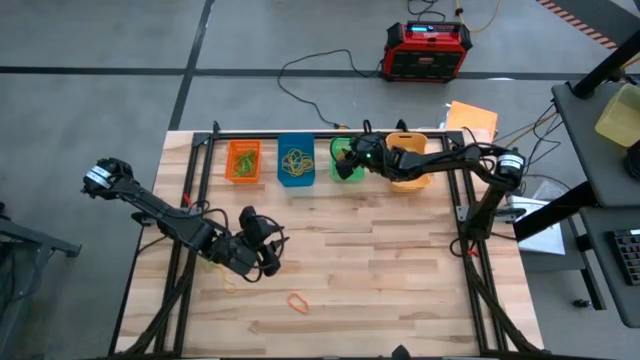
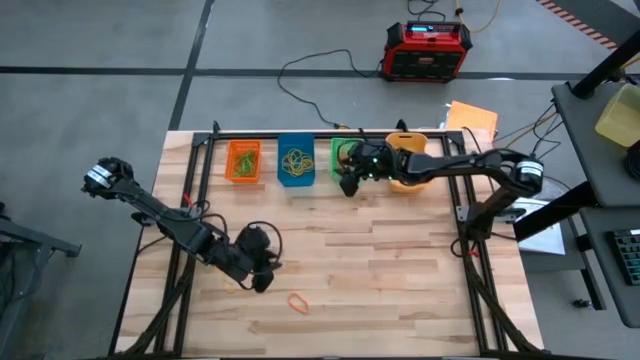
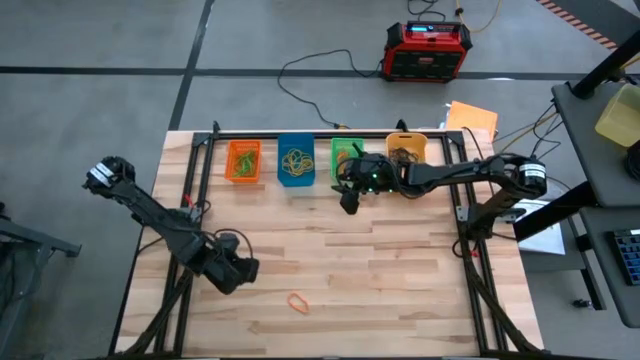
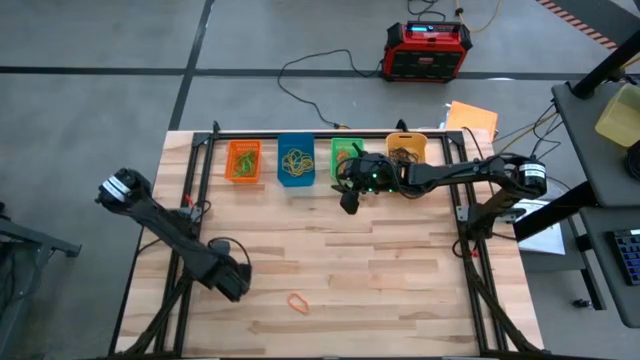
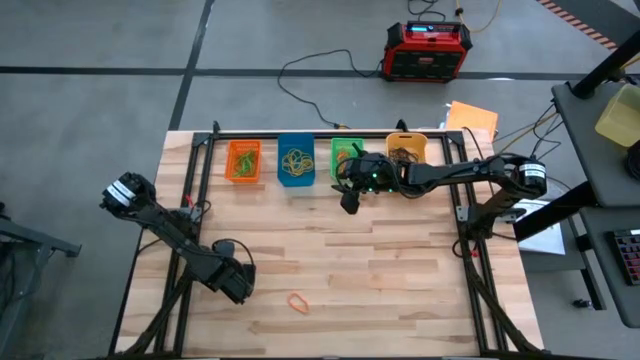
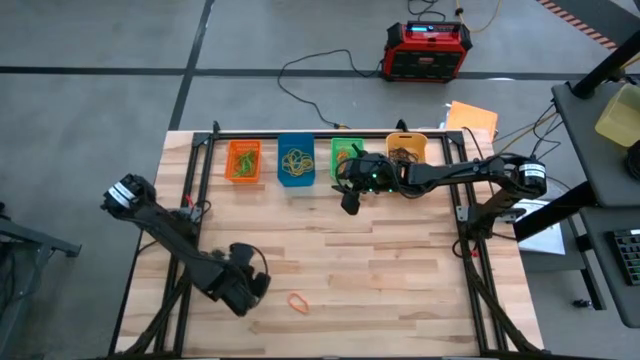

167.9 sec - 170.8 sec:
Task: Sort rubber bands into baskets
Put the yellow rubber band into the blue bin

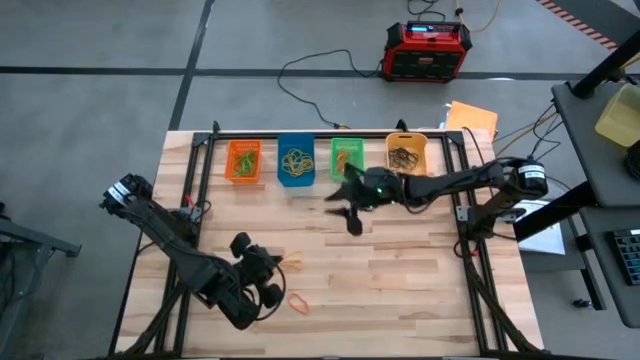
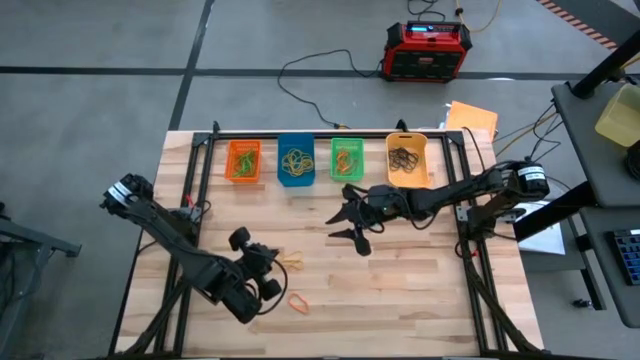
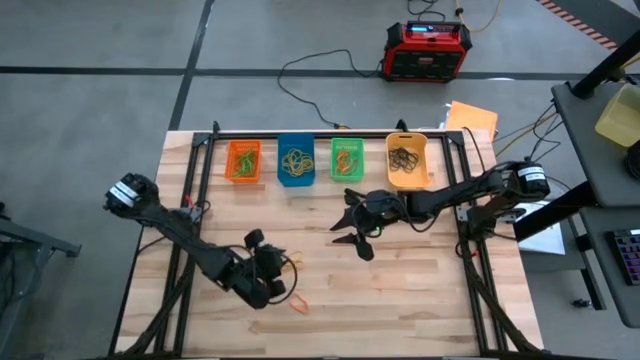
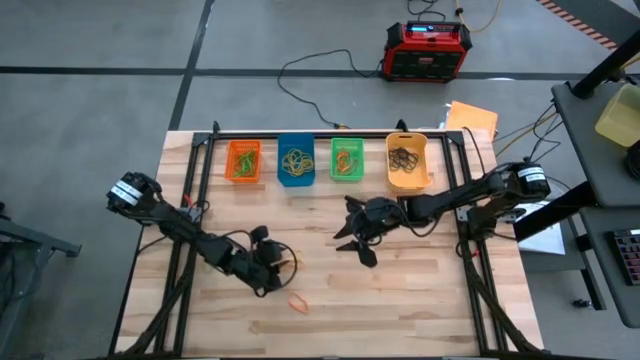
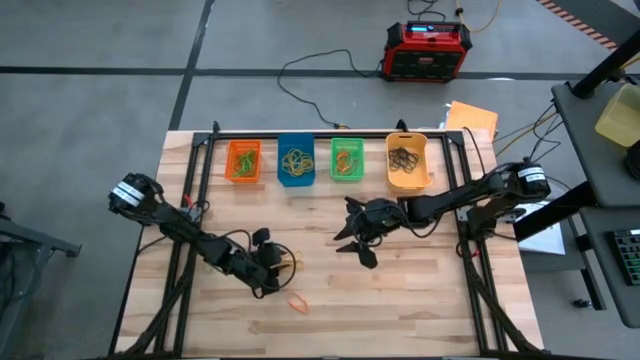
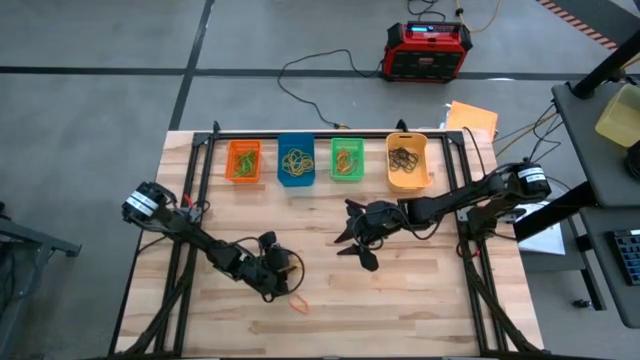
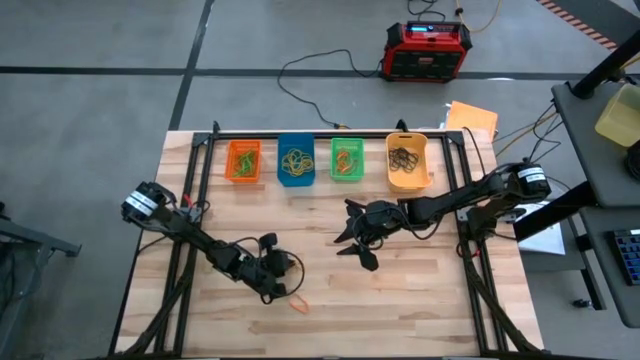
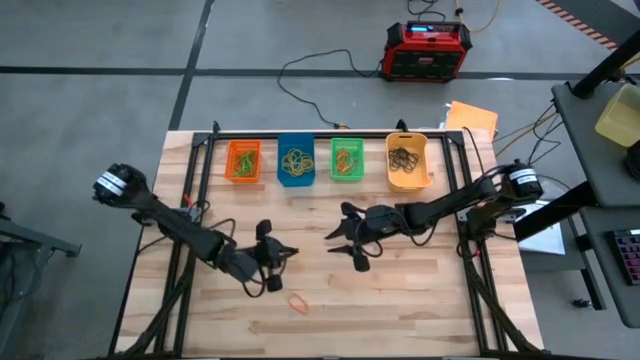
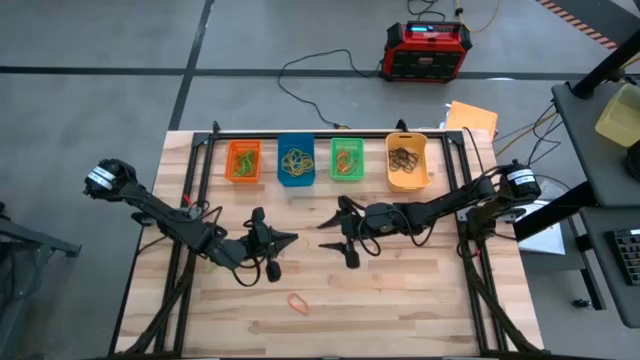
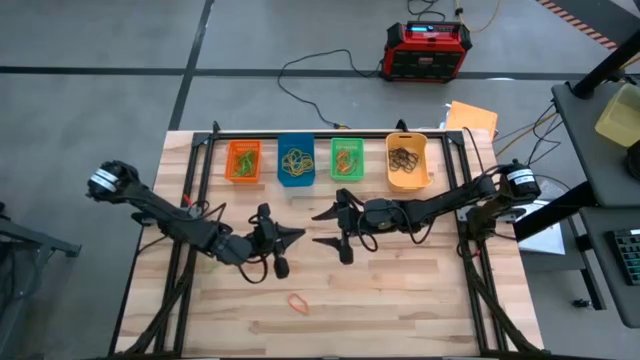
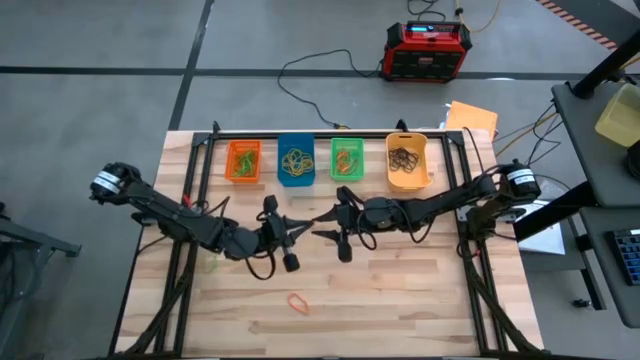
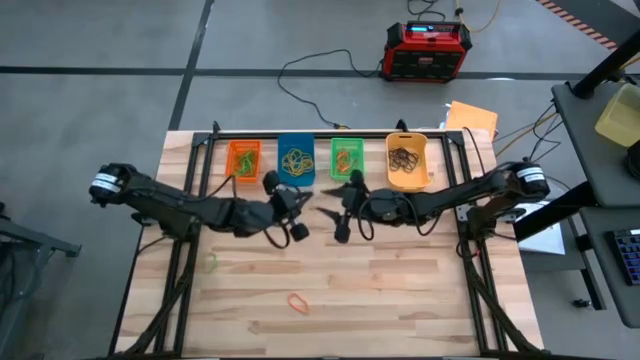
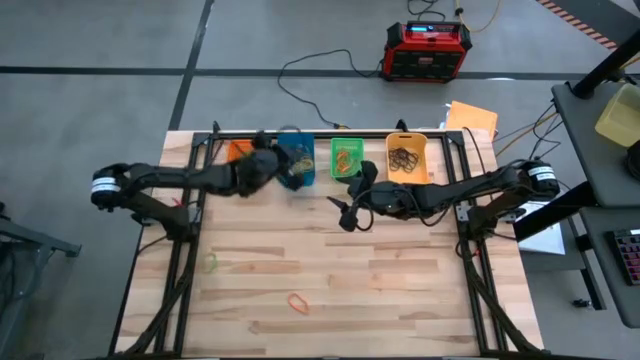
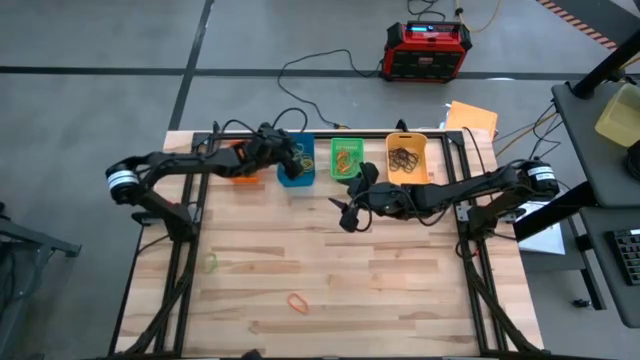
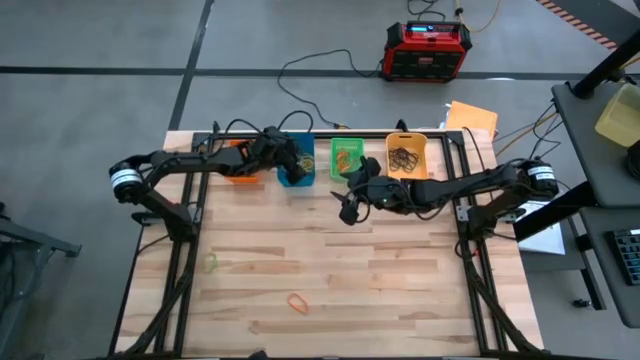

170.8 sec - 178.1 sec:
Put the yellow rubber band into the blue bin

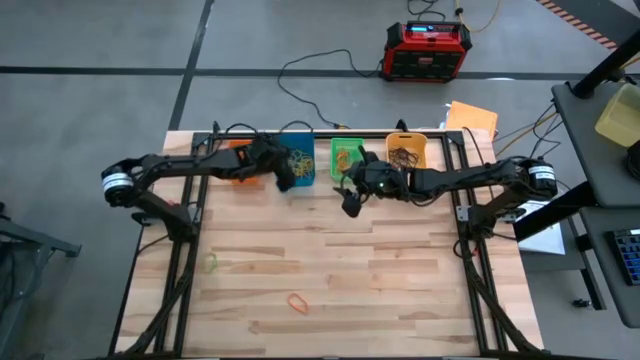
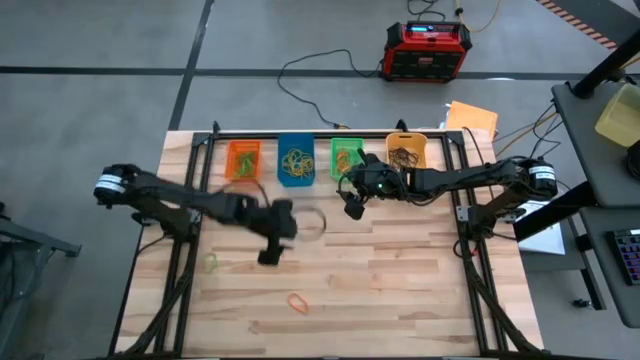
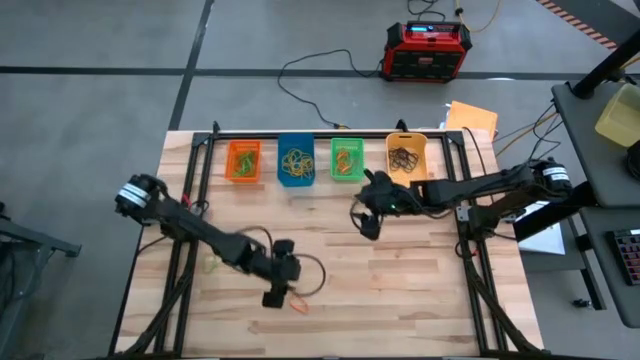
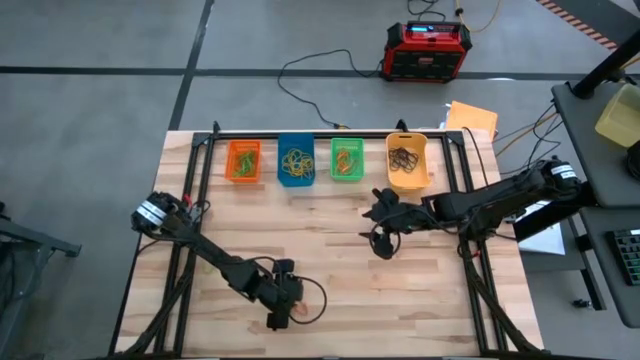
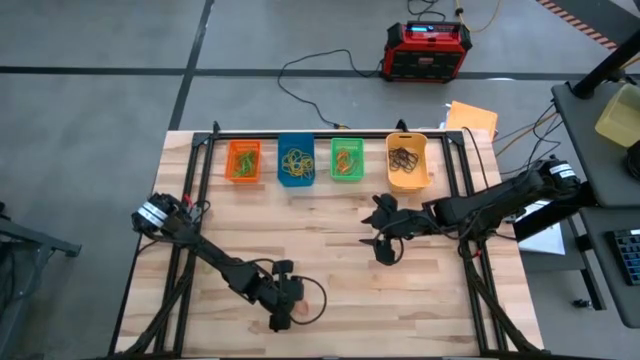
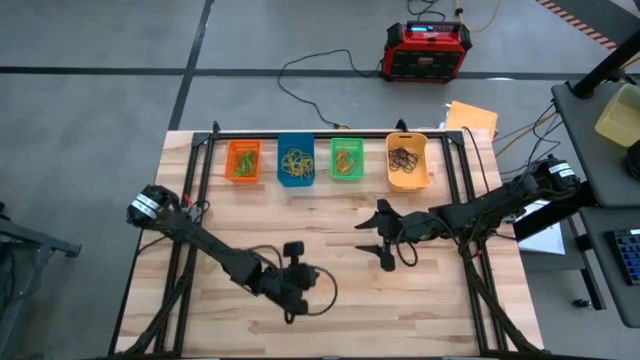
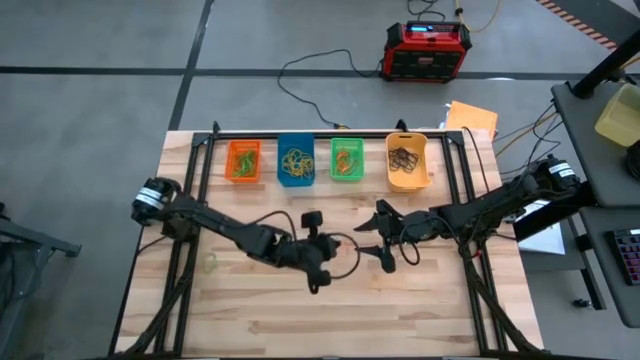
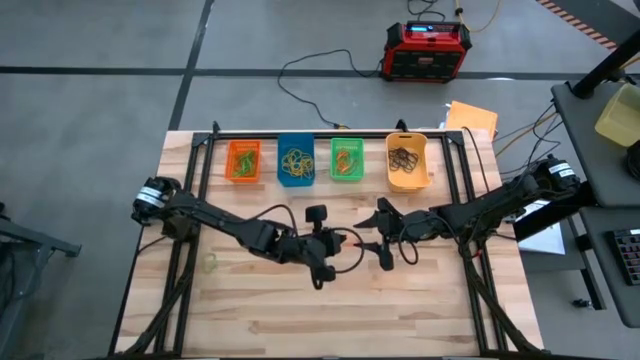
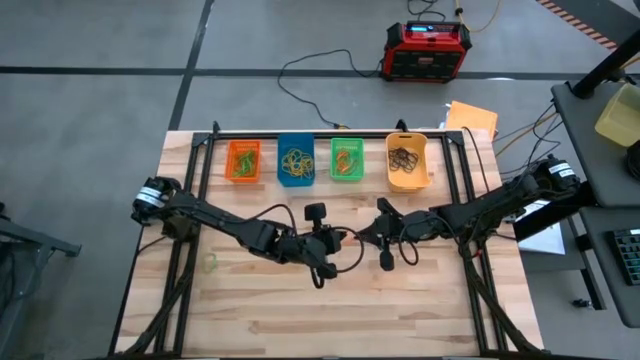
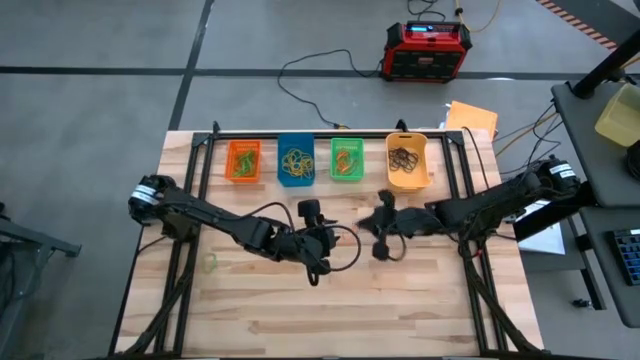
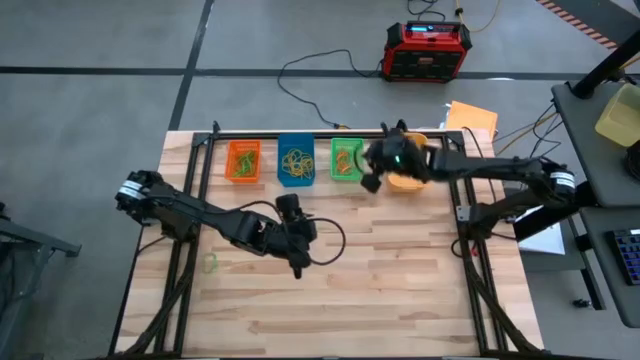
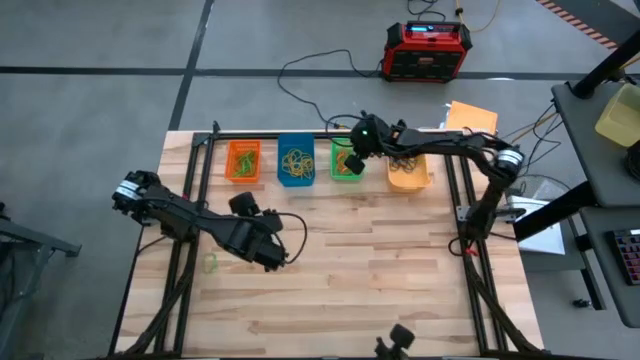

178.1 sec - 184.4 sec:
Put the orange rubber band into the green bin

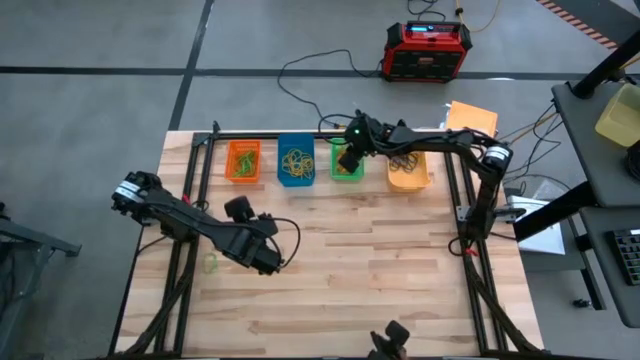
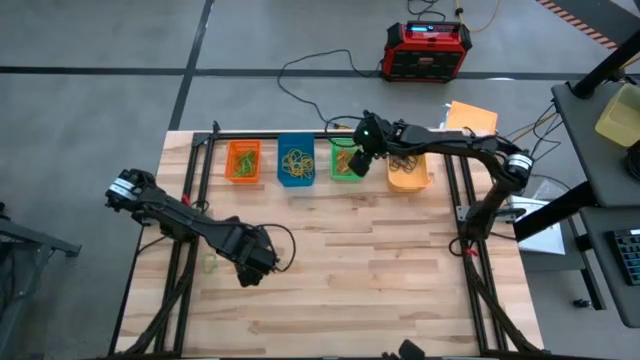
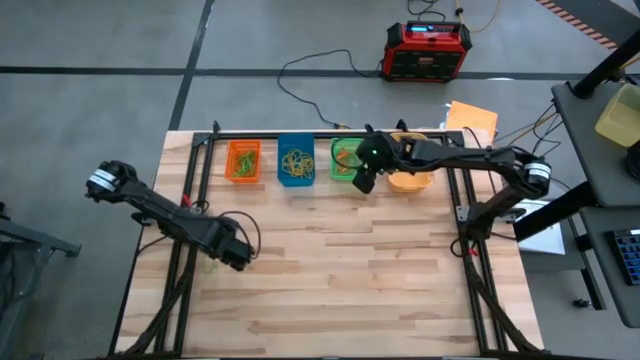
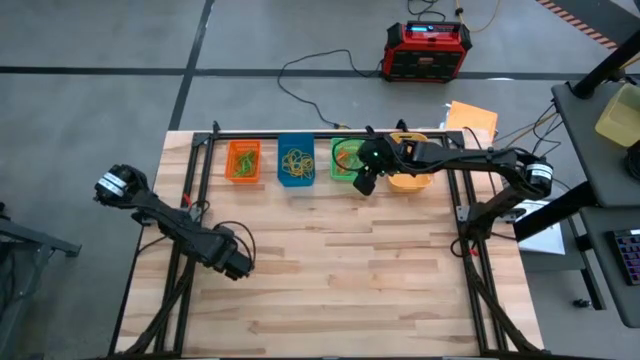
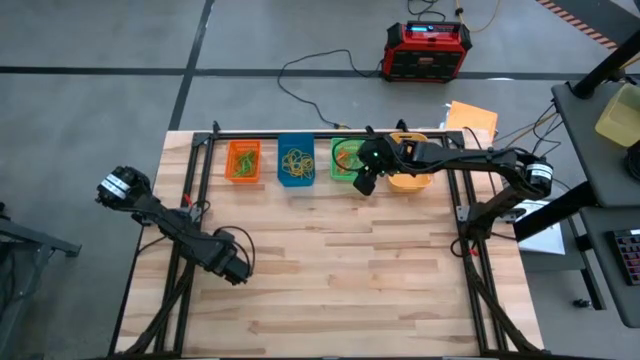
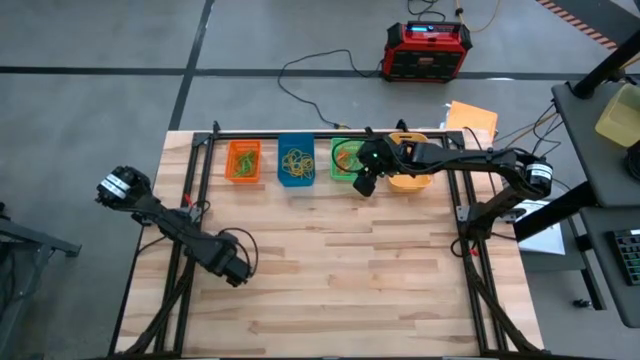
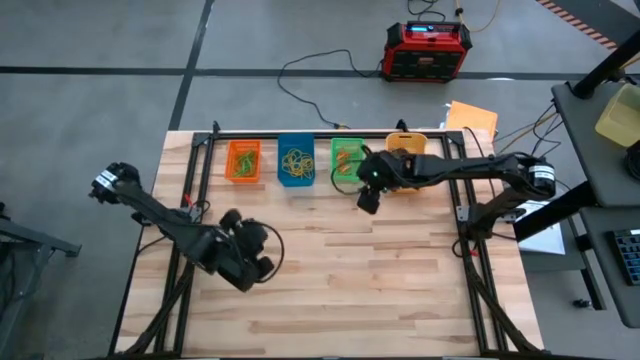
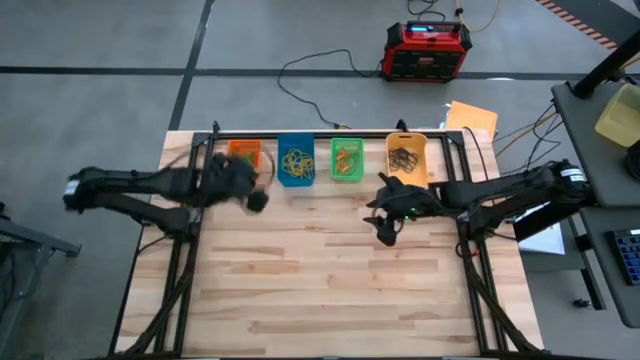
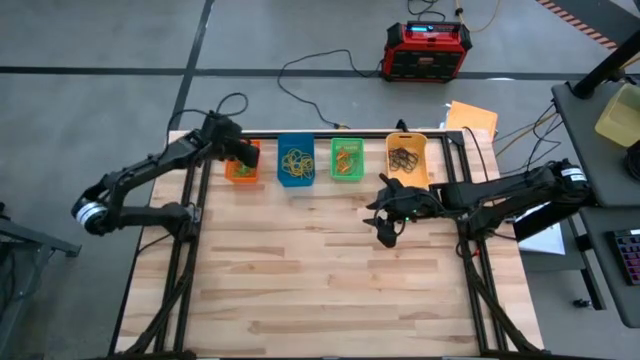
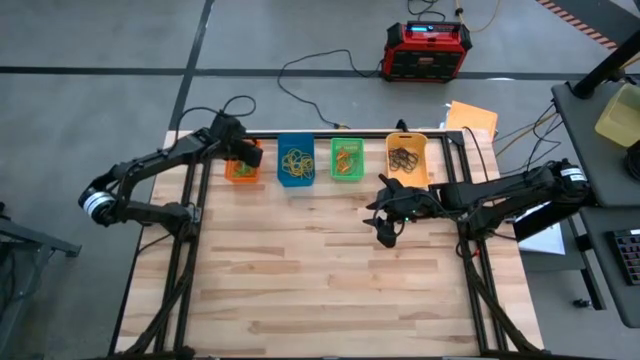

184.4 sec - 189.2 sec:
Put the green rubber band into the orange bin
